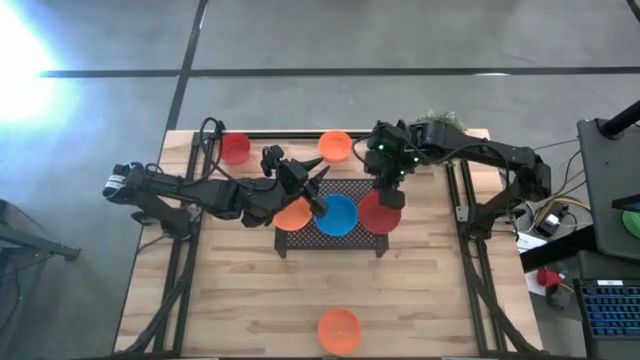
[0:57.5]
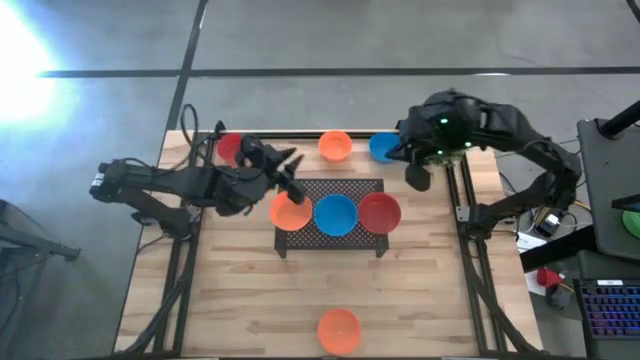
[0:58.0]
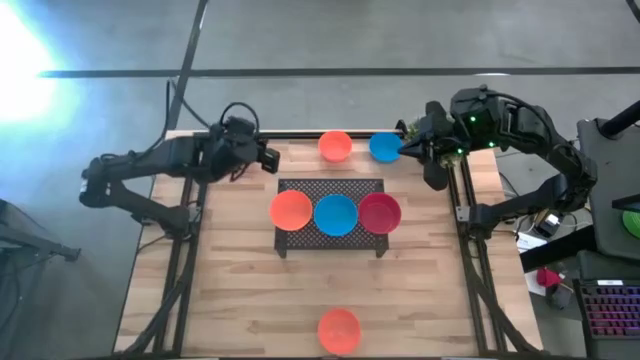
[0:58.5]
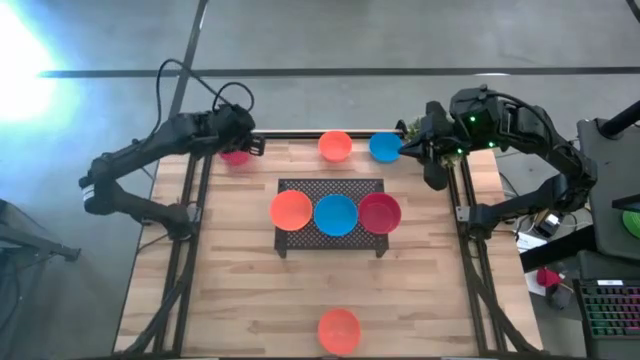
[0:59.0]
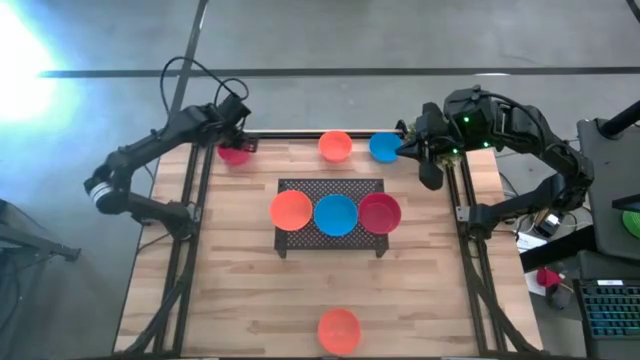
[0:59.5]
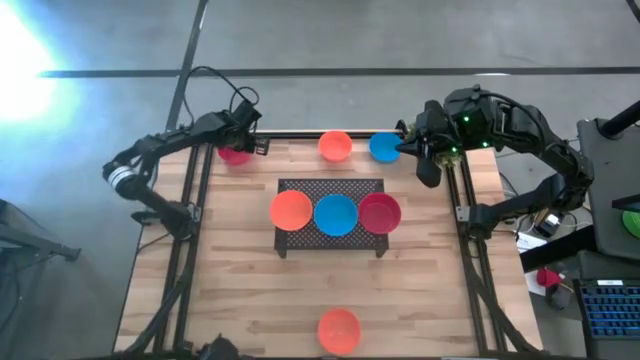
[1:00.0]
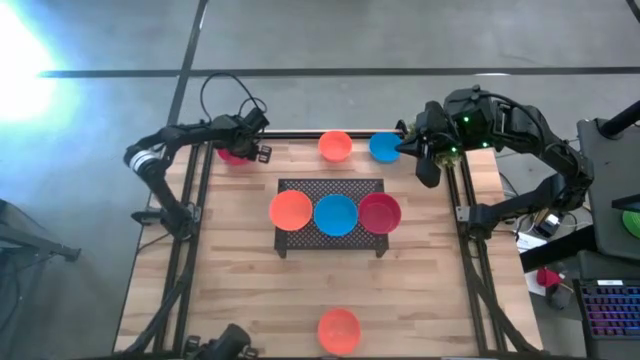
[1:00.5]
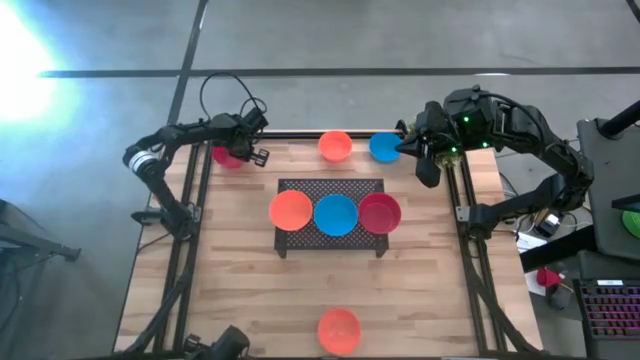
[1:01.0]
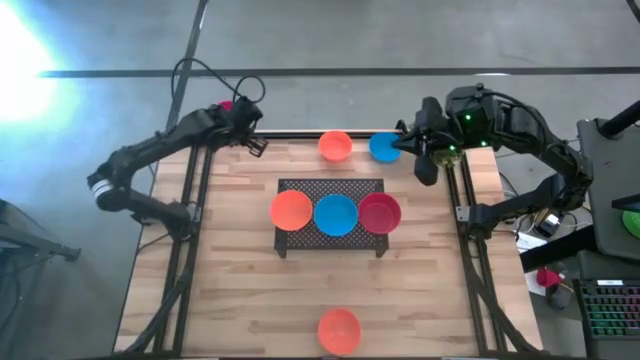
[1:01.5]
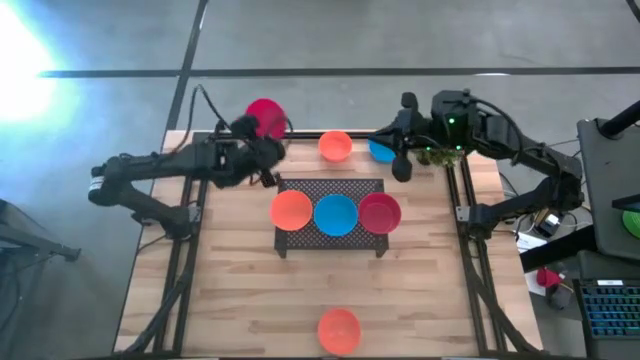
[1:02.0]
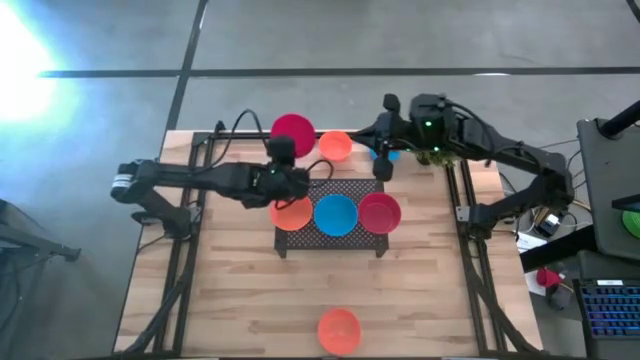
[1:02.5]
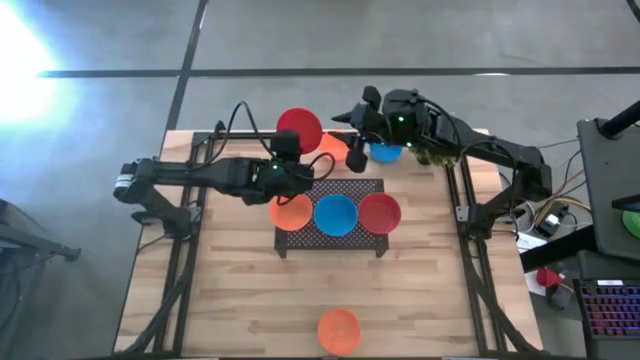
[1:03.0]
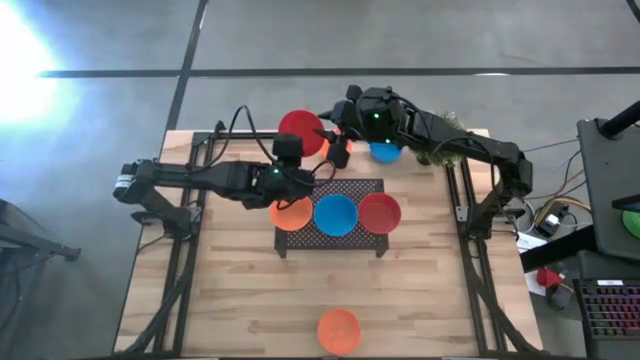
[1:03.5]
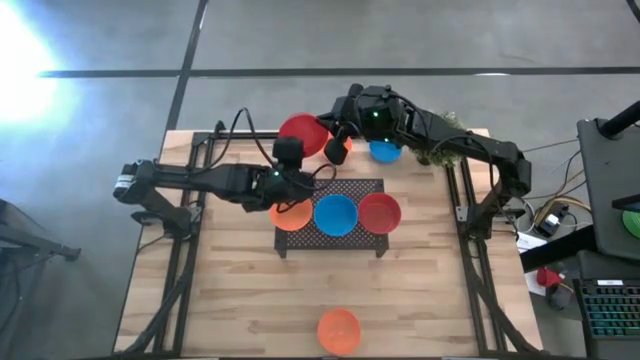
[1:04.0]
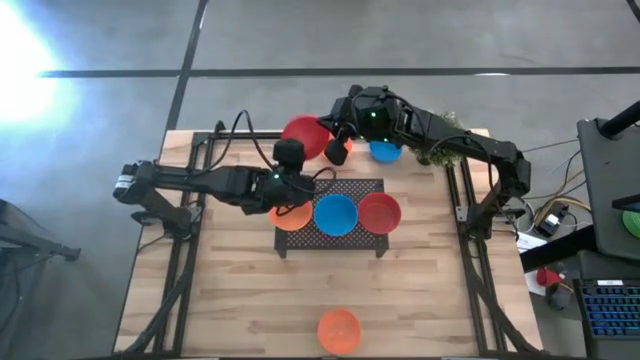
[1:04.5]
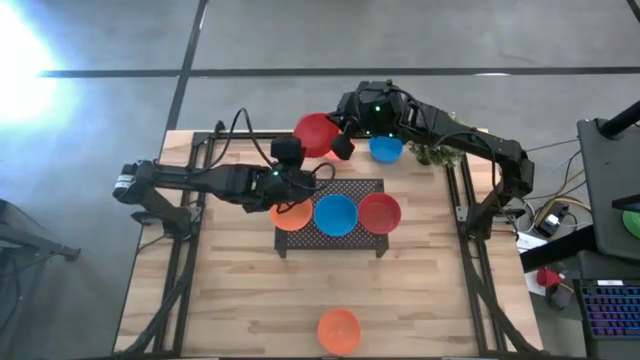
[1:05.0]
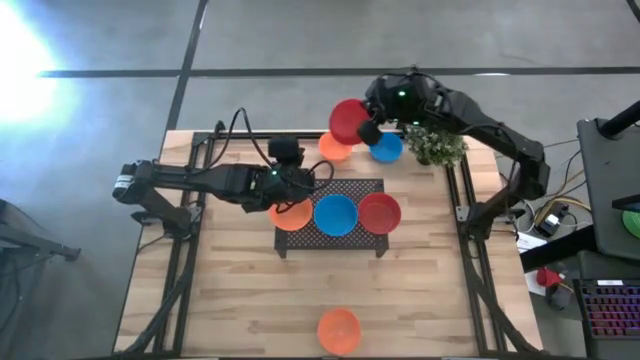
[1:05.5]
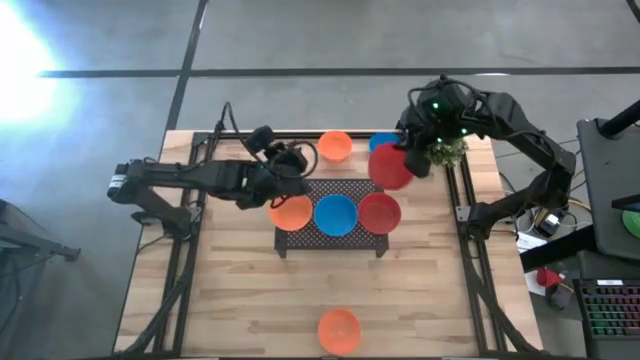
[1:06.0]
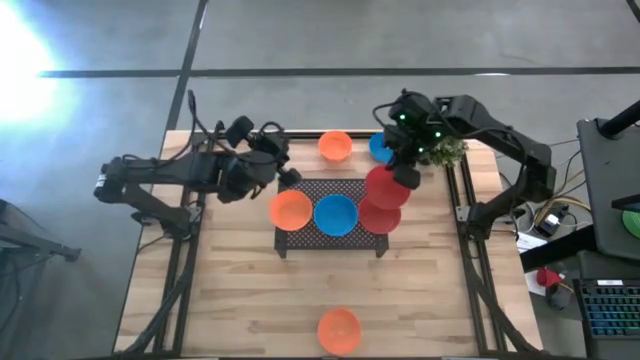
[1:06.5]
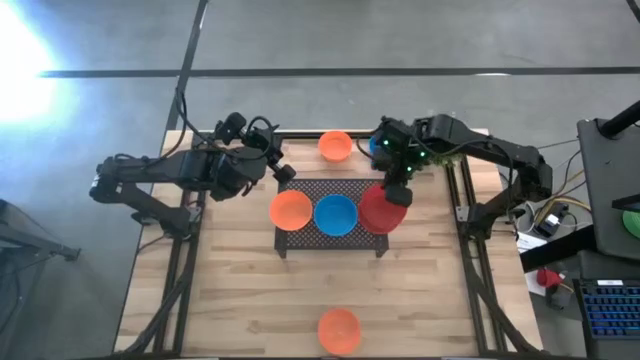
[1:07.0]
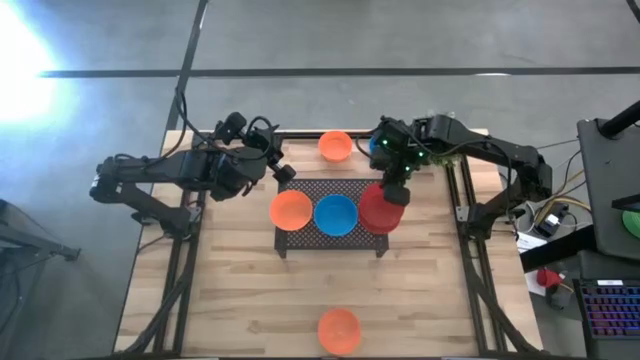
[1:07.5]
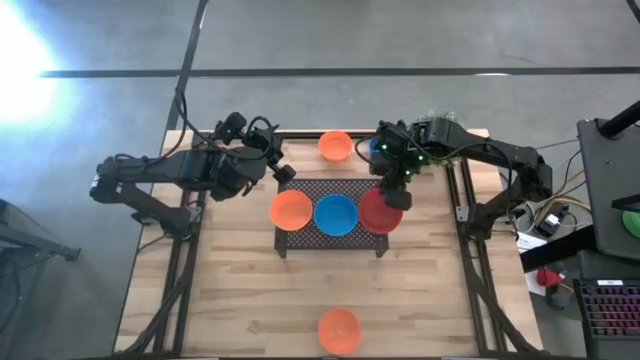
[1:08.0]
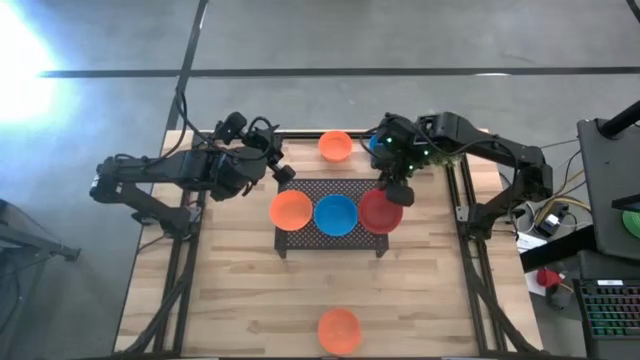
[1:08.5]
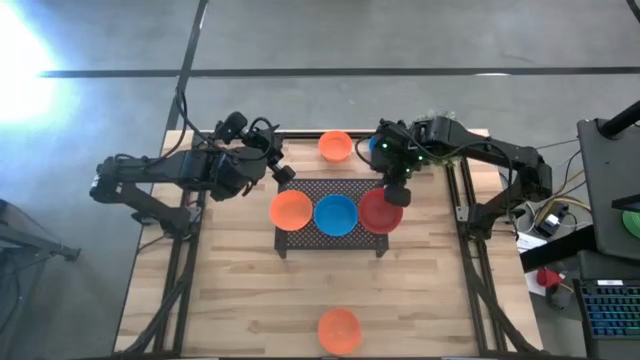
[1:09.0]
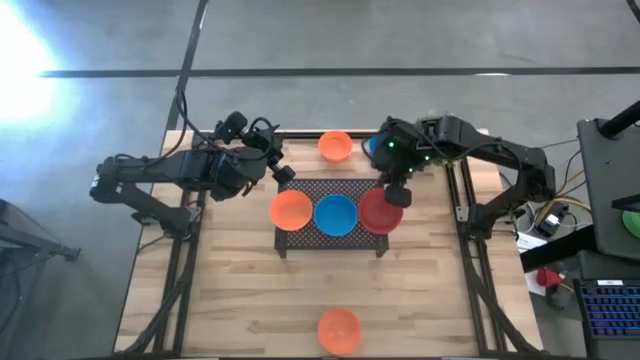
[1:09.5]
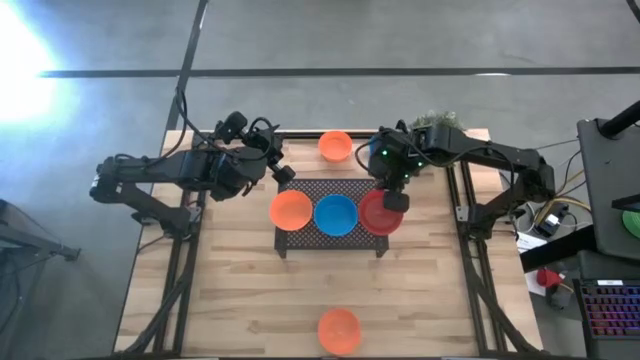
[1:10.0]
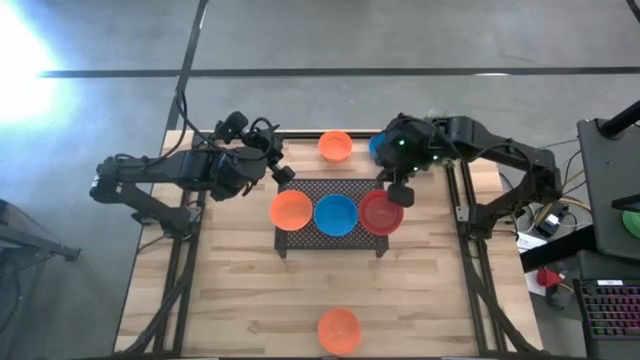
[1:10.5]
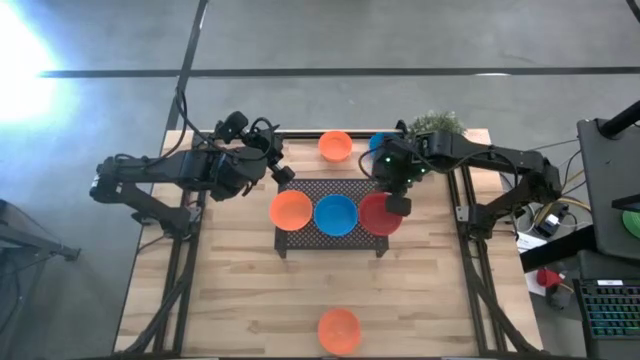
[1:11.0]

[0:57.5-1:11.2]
Task: Pick & Place Mini bowls
Stack the red bowl on top of the red bowls on the shelf

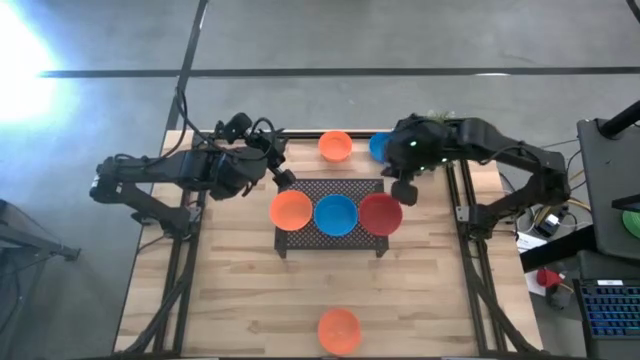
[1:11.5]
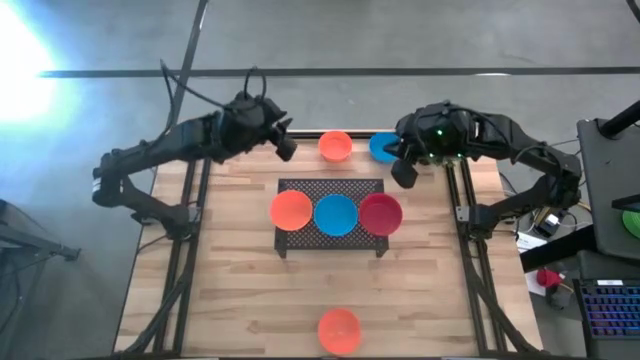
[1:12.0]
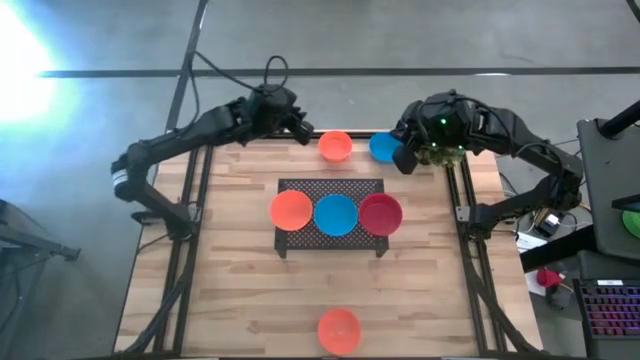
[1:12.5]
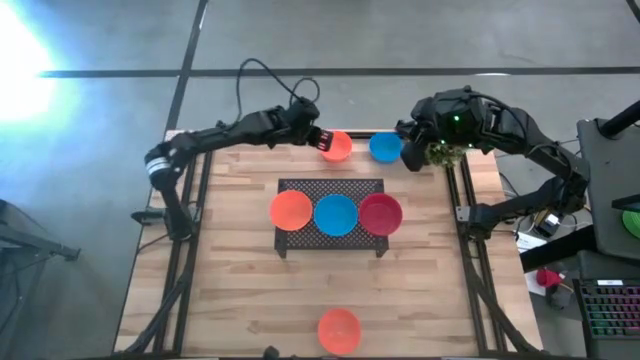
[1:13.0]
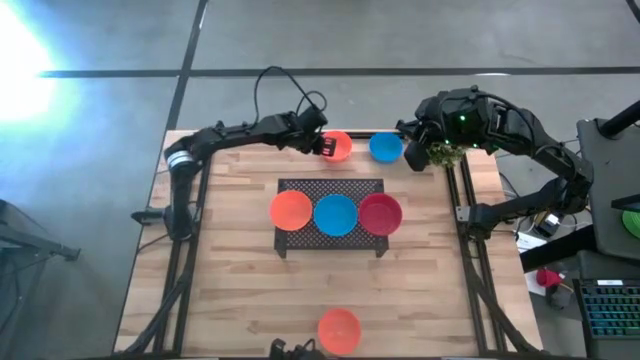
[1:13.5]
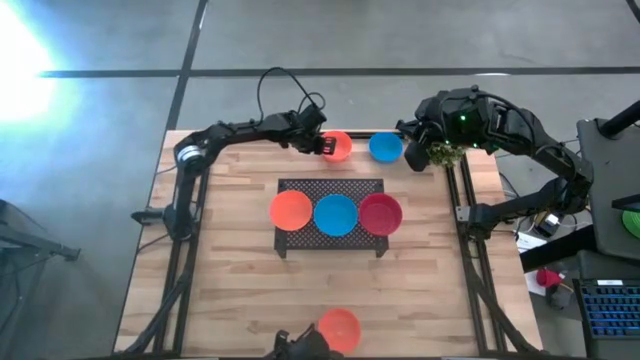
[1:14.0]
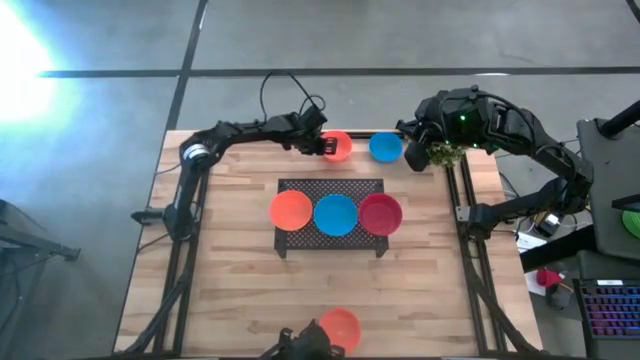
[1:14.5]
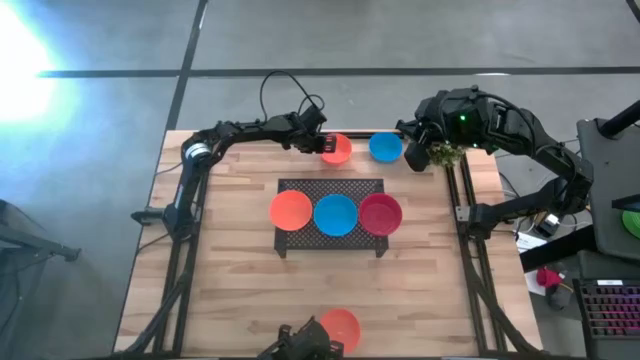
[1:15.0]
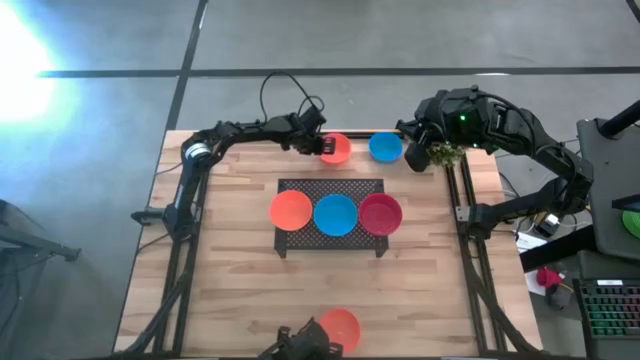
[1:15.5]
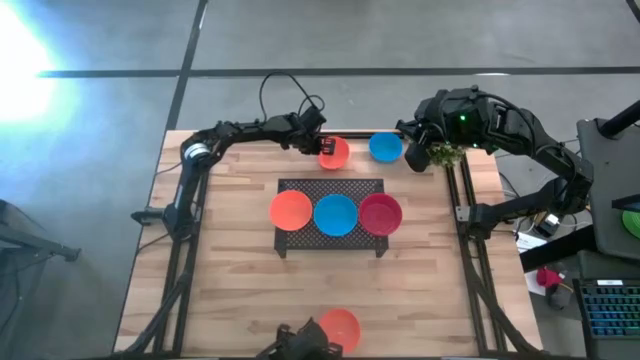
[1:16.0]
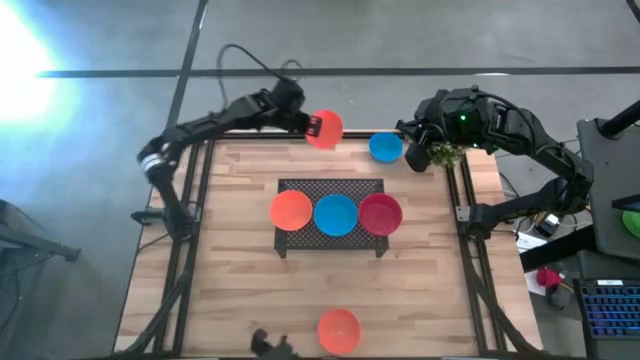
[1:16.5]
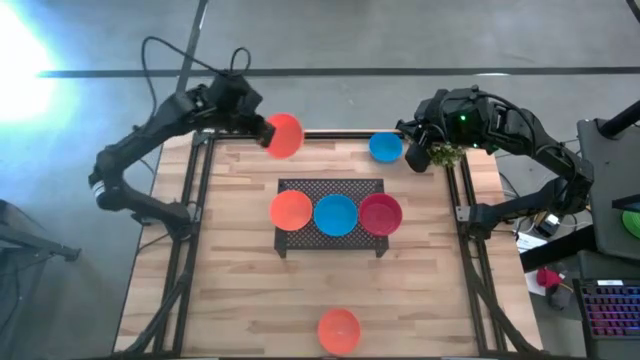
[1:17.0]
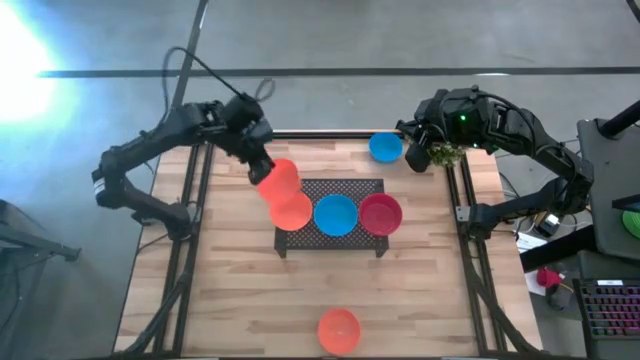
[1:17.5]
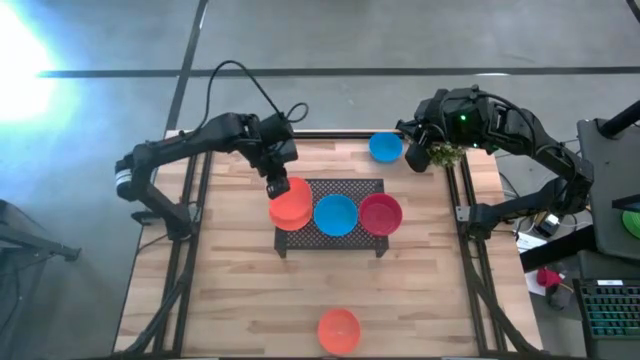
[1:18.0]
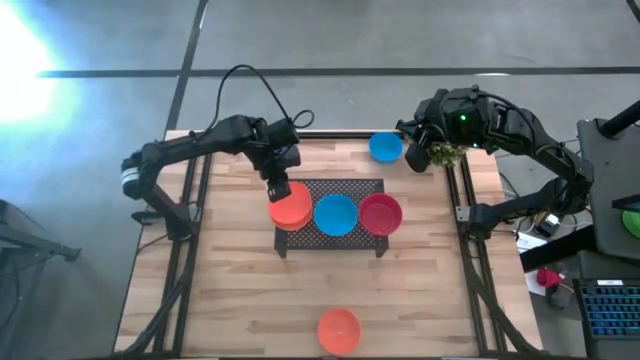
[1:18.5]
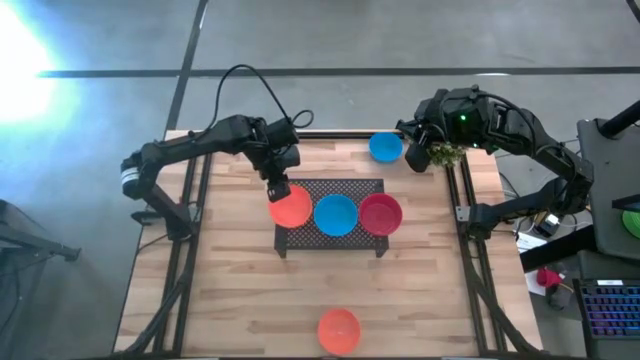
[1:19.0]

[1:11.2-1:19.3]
Stack the top orange bowl on top of the orange bowl on the shelf
